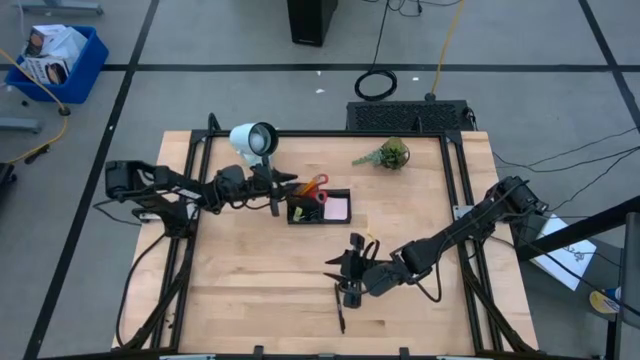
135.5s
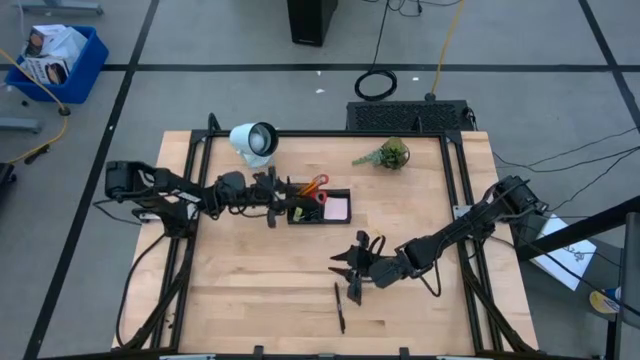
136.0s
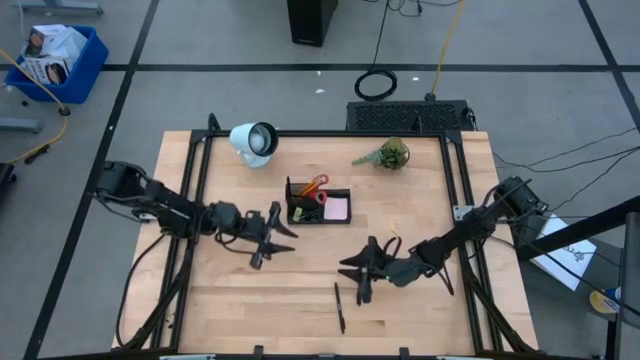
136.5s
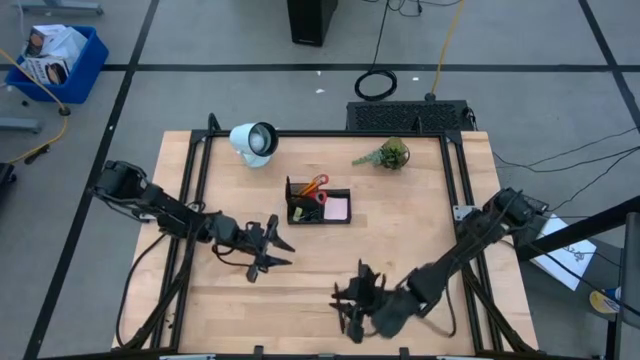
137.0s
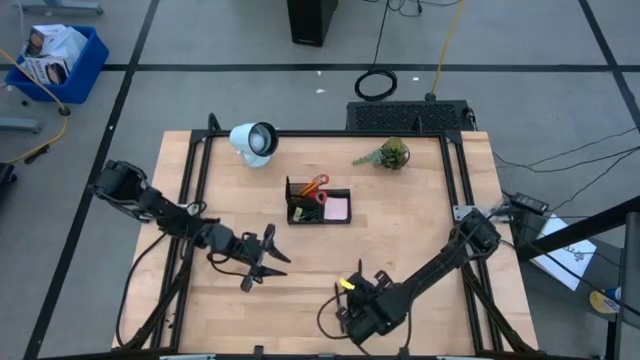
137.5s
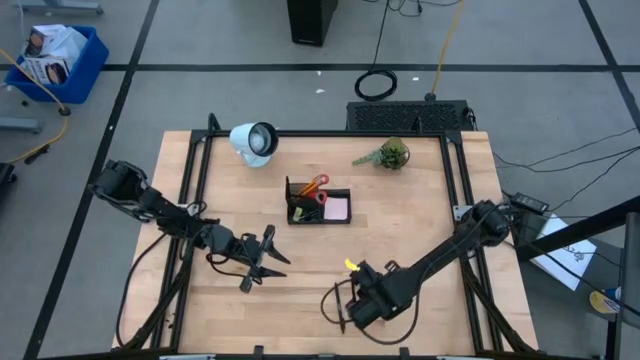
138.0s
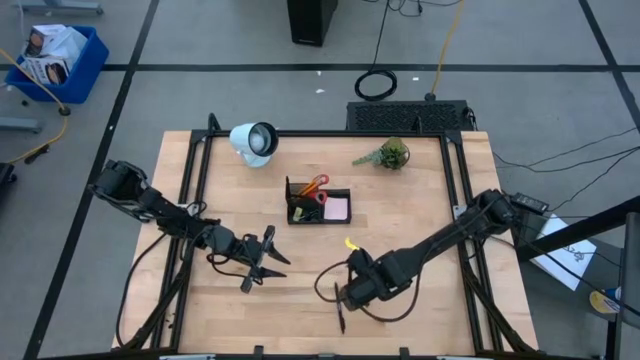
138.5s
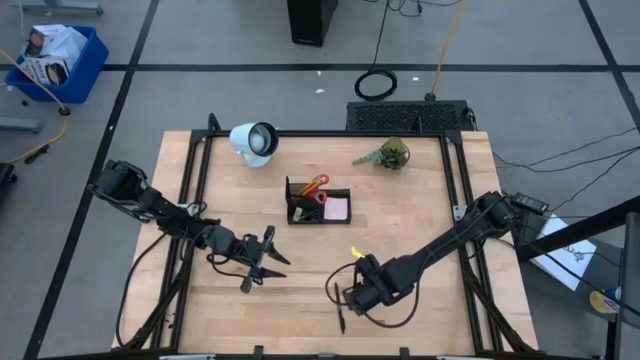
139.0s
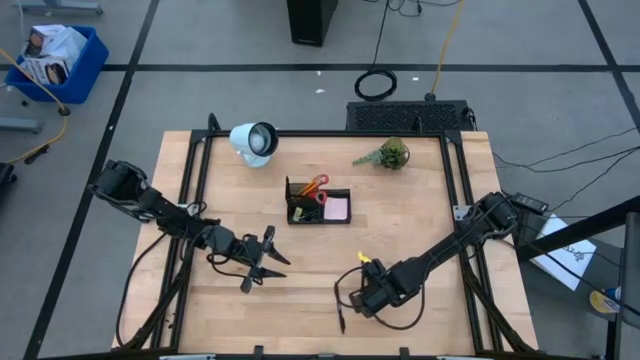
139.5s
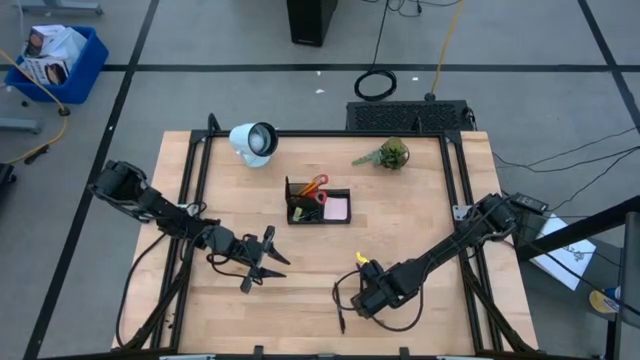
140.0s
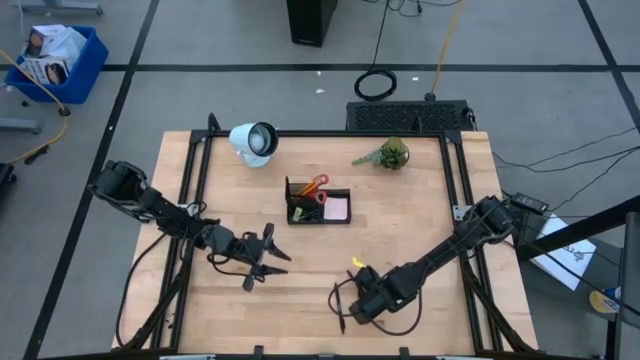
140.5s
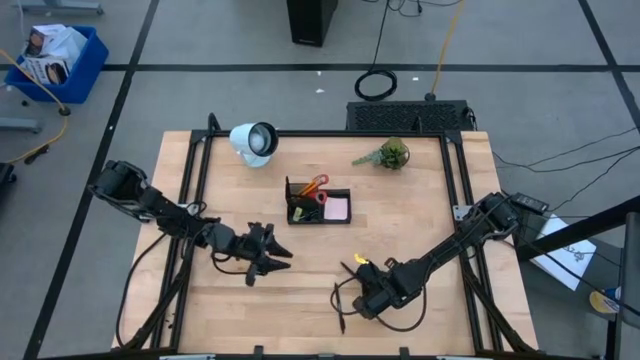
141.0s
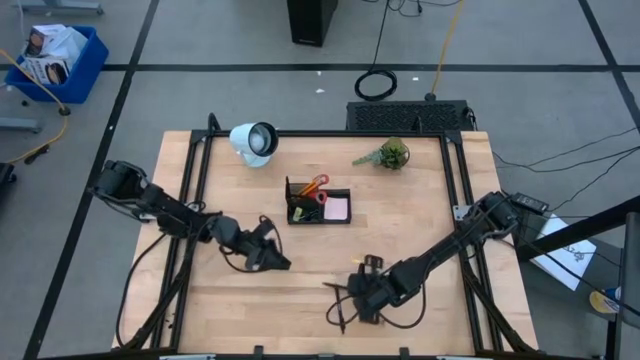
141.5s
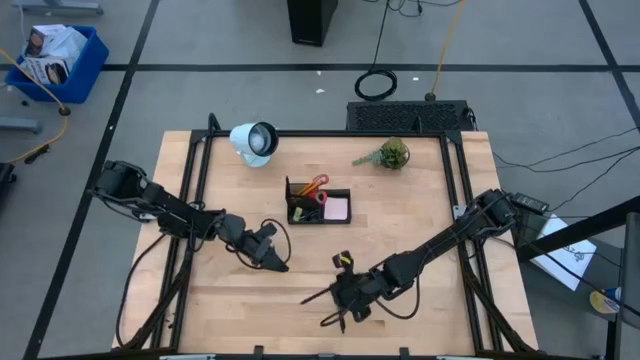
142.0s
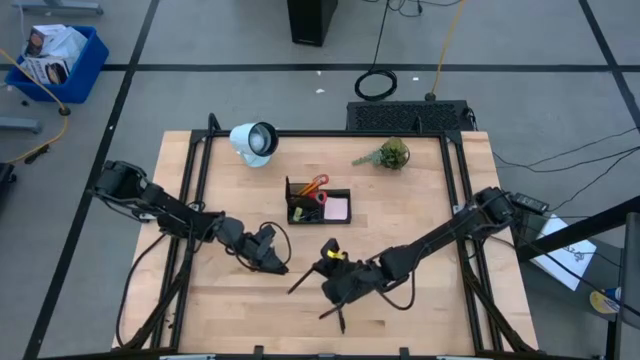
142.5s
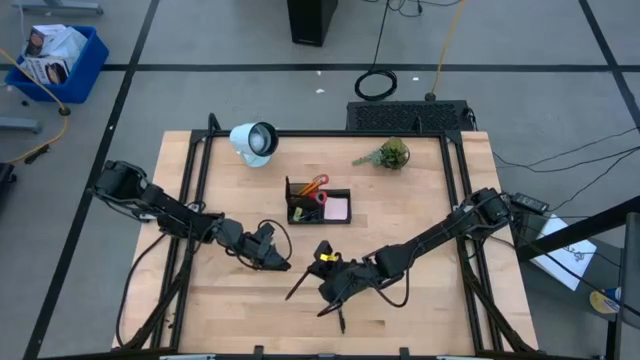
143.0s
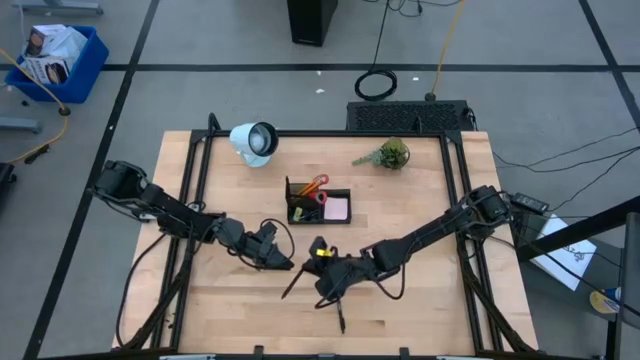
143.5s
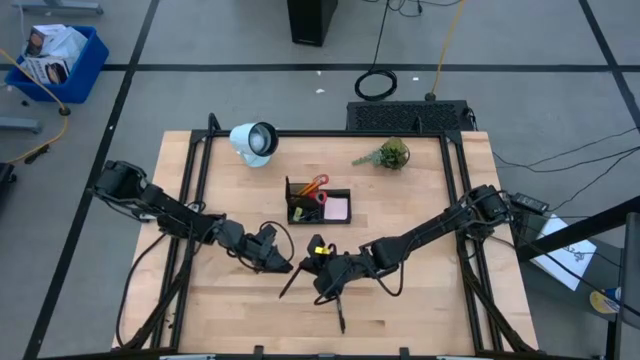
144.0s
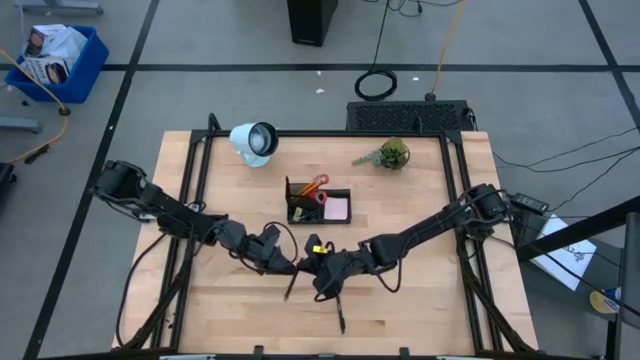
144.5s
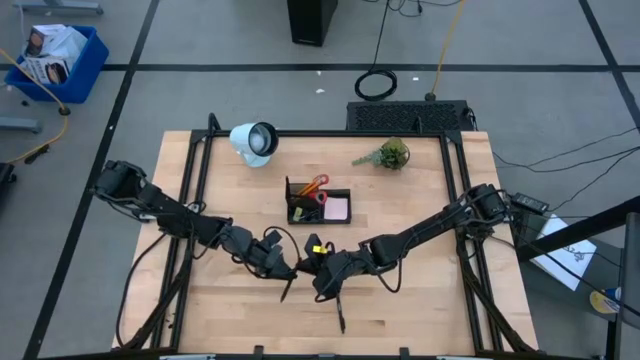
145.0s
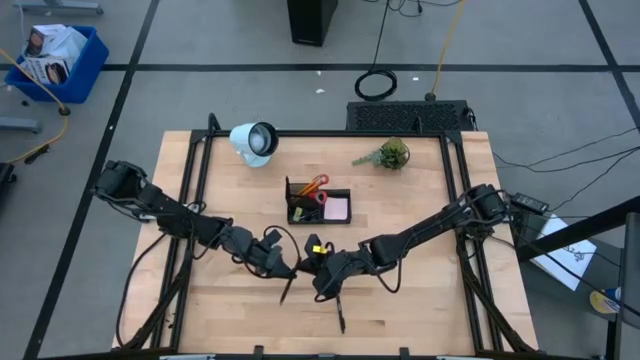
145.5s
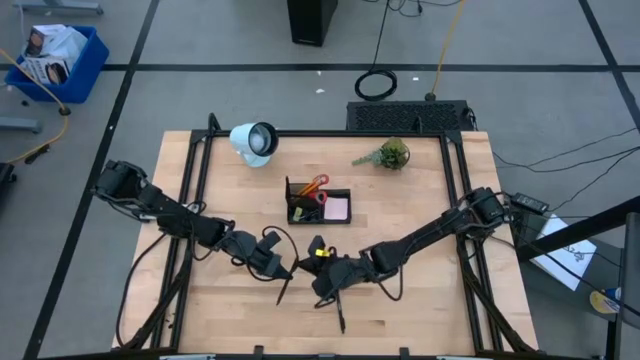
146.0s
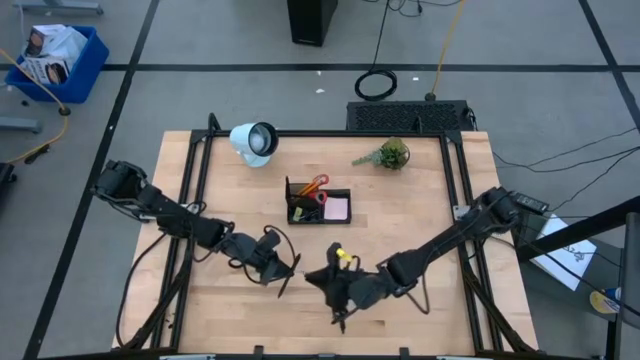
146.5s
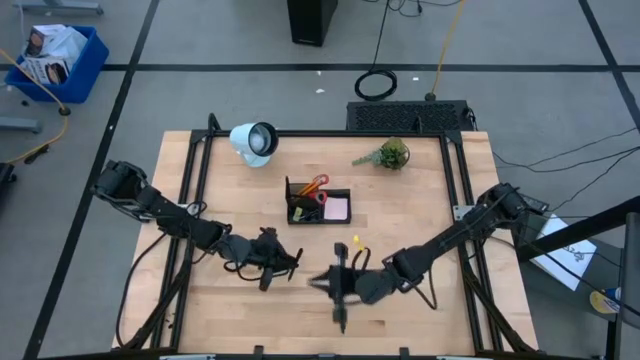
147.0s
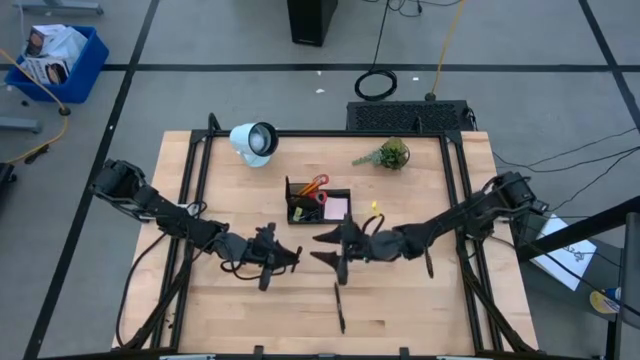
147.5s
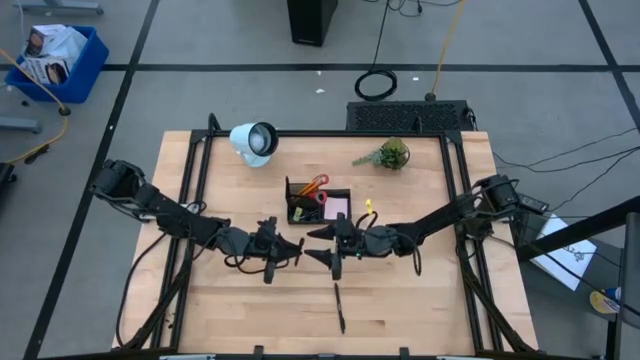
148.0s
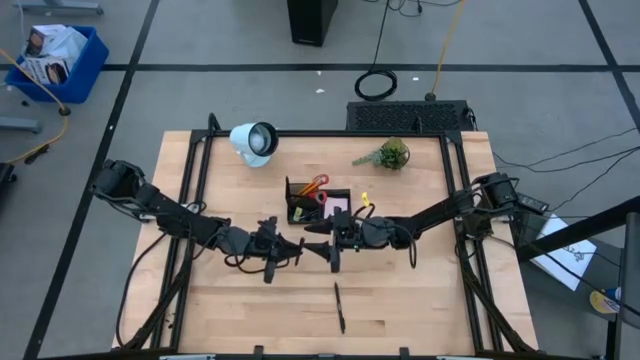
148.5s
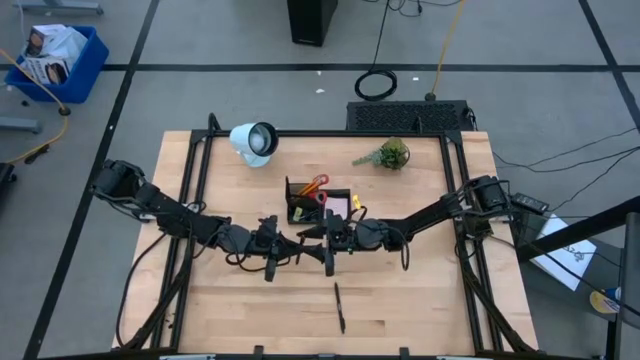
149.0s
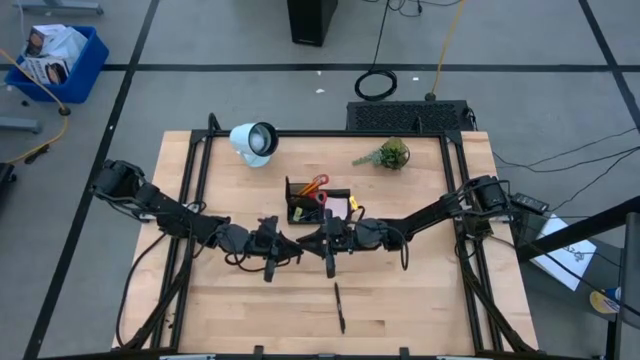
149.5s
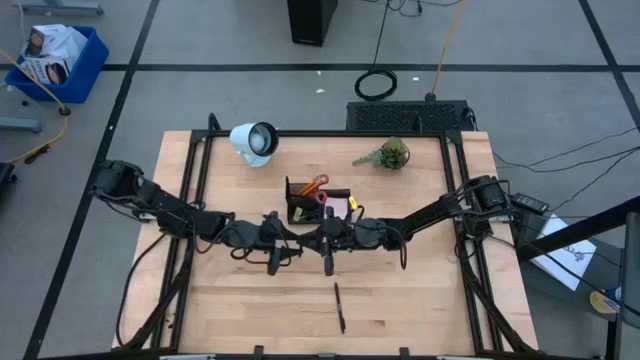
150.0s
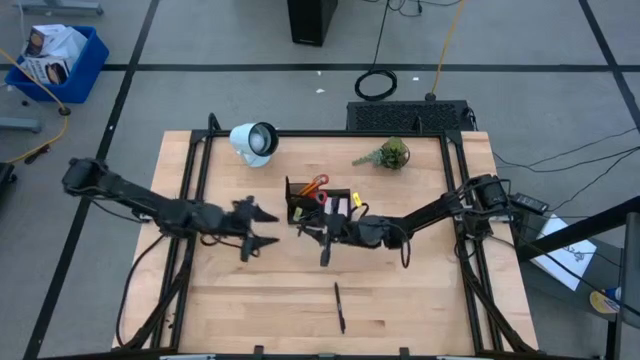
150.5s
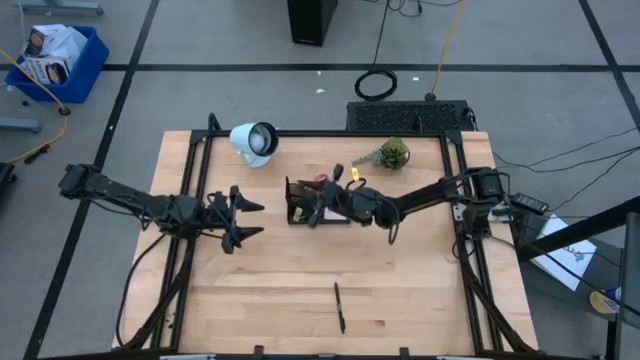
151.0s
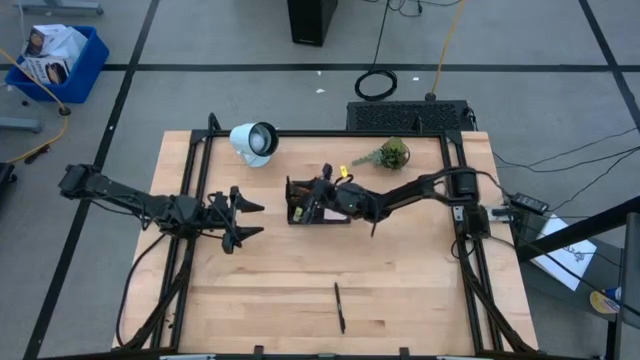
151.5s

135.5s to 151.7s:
Task: Pick and place office supplies into organizer
Put the black pen into the black desk organizer

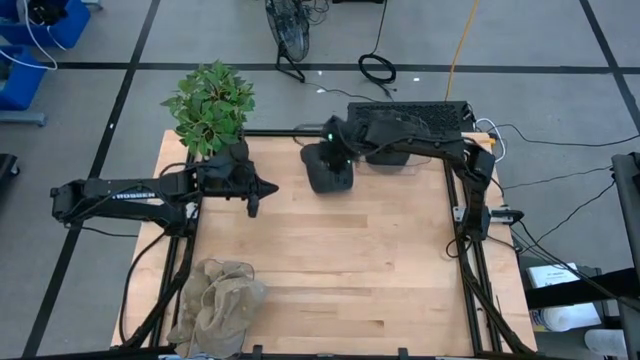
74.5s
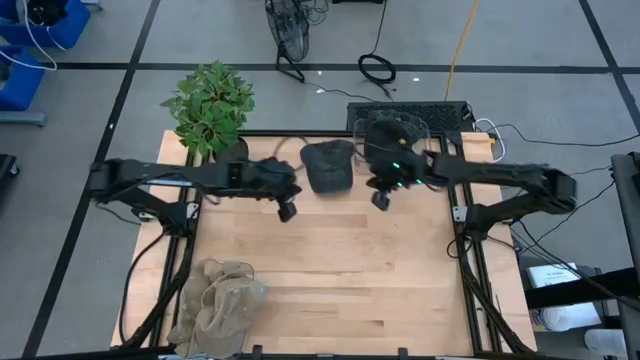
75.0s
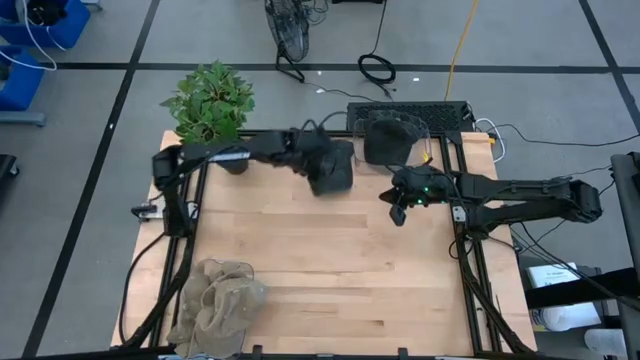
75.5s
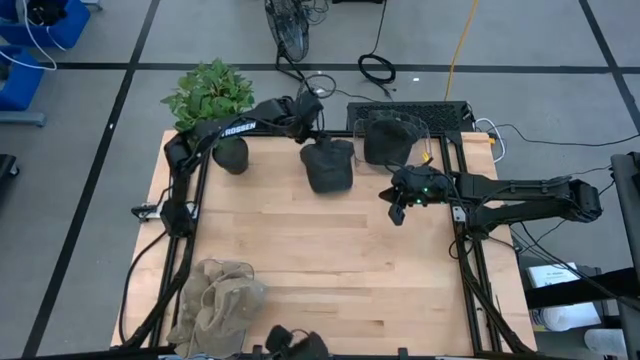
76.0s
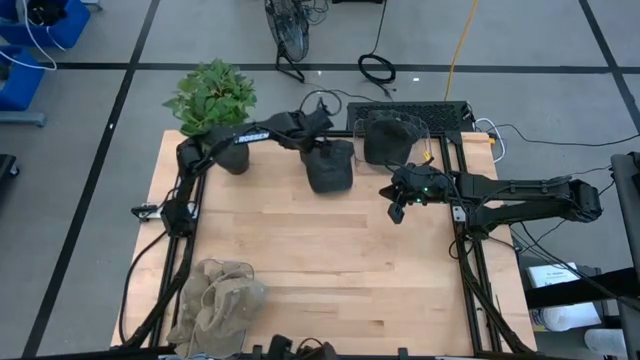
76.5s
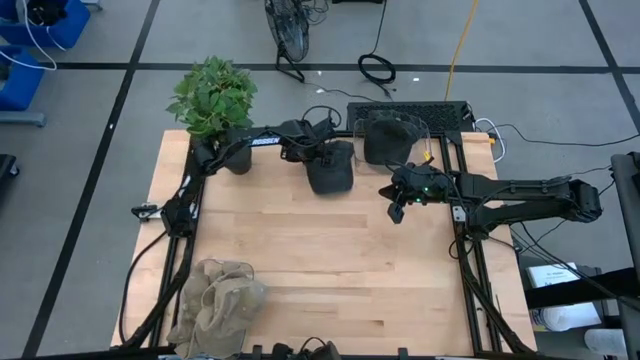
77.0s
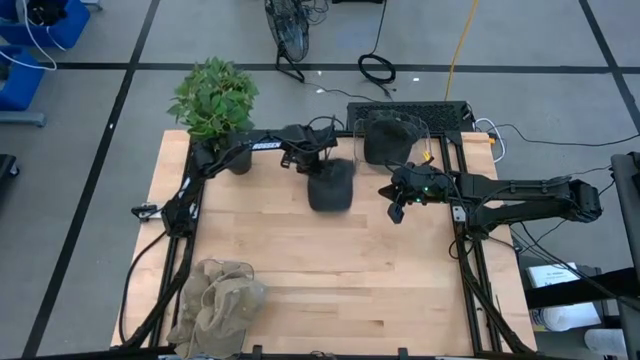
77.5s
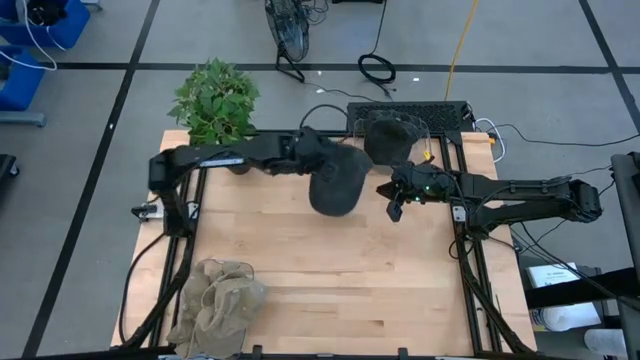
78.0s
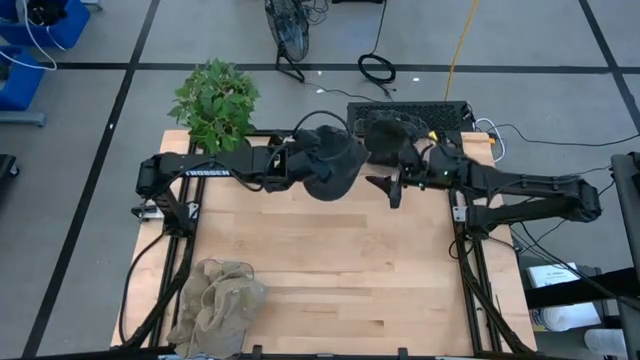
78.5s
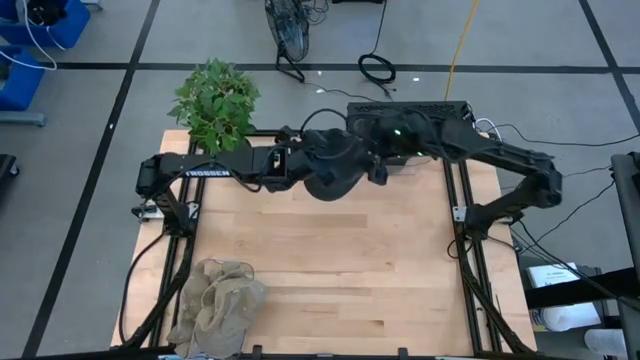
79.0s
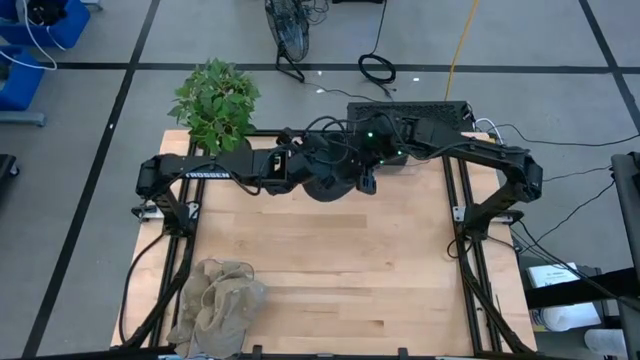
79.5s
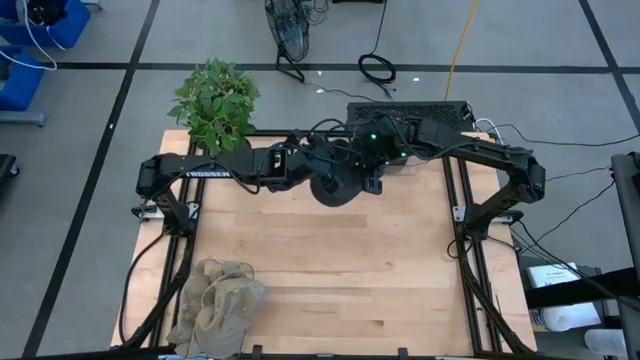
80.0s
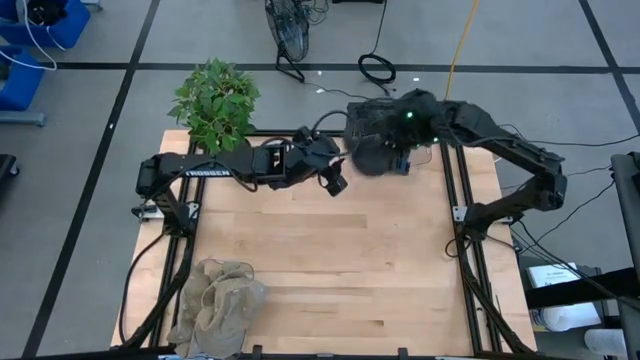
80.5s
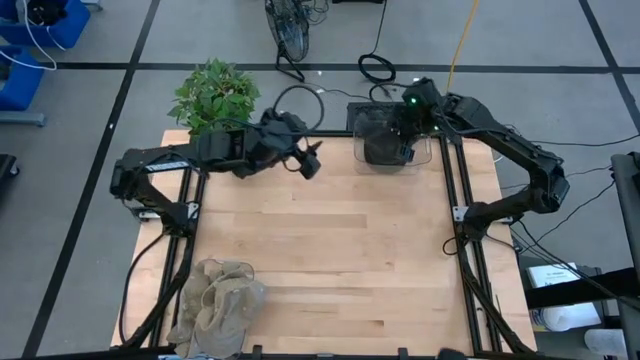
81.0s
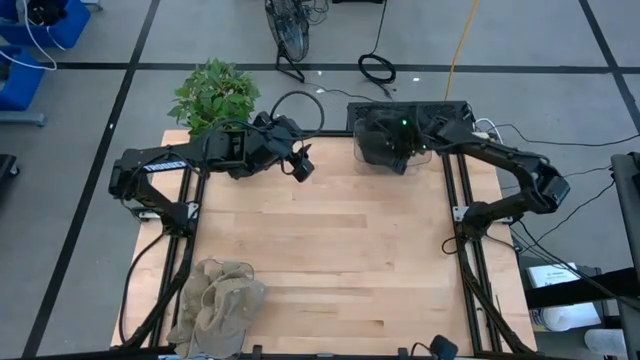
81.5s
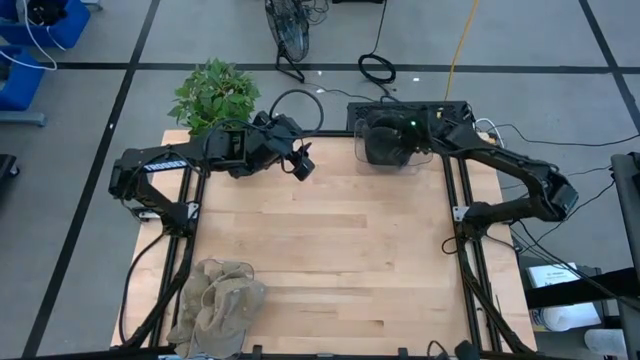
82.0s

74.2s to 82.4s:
Task: Pick & Place hat
Put the black cap into the top transparent bin
